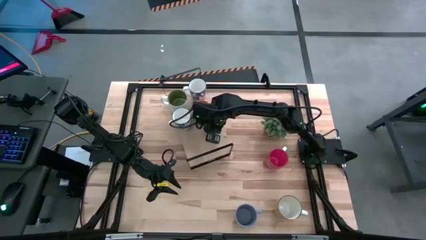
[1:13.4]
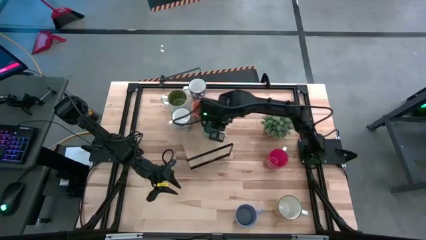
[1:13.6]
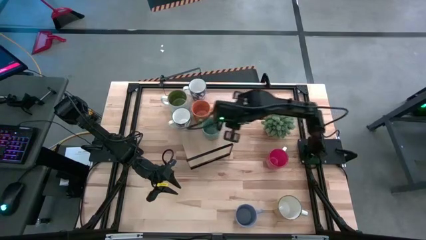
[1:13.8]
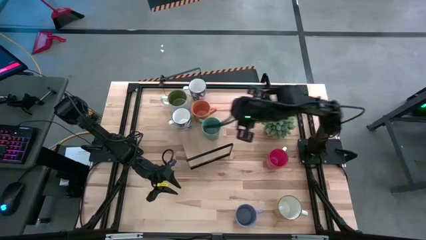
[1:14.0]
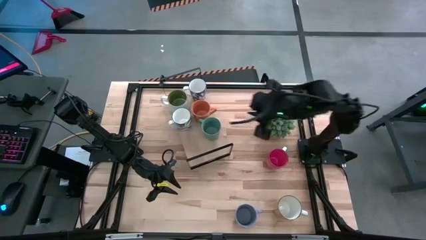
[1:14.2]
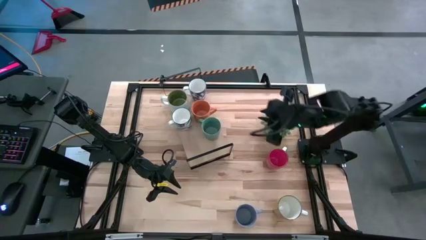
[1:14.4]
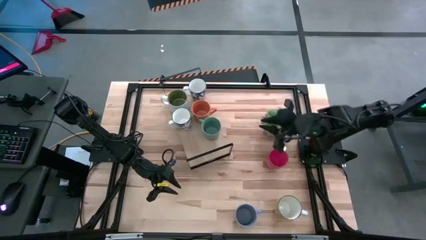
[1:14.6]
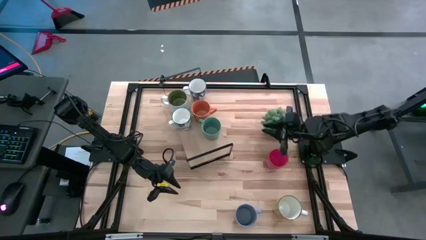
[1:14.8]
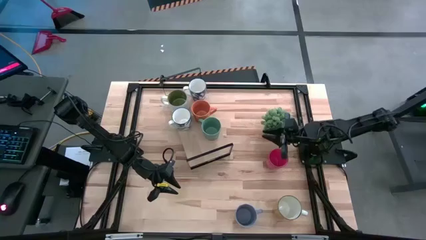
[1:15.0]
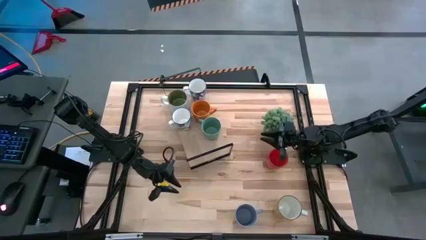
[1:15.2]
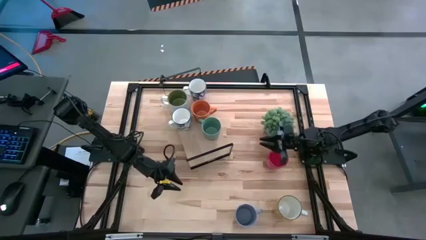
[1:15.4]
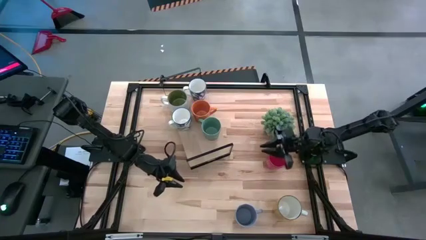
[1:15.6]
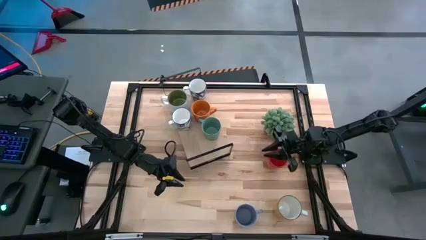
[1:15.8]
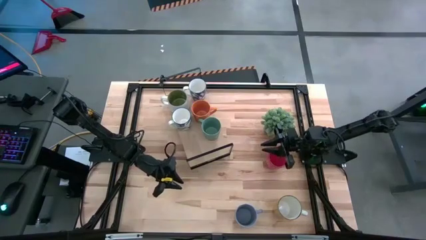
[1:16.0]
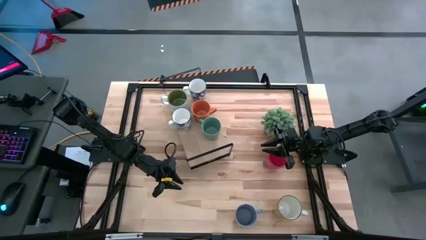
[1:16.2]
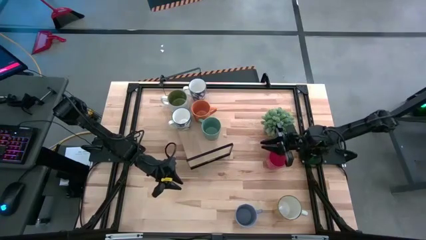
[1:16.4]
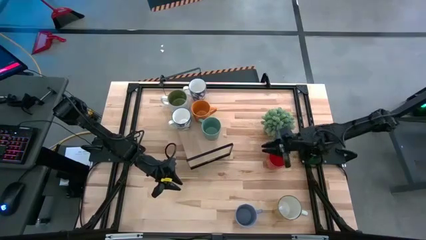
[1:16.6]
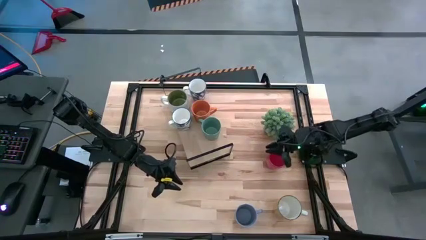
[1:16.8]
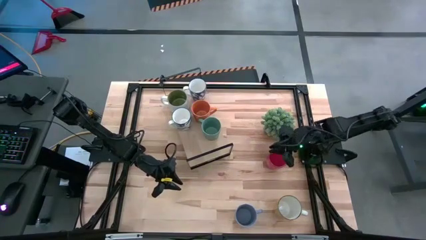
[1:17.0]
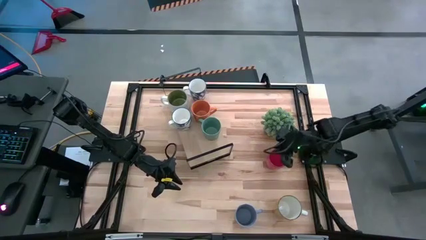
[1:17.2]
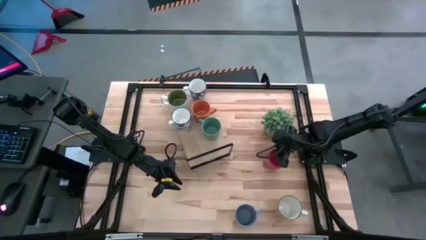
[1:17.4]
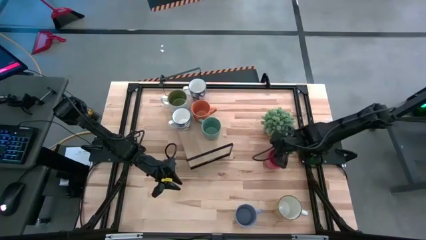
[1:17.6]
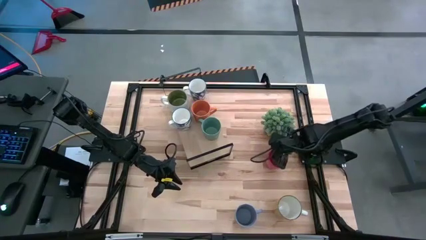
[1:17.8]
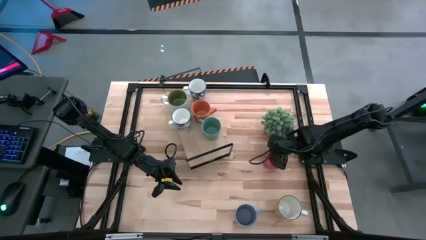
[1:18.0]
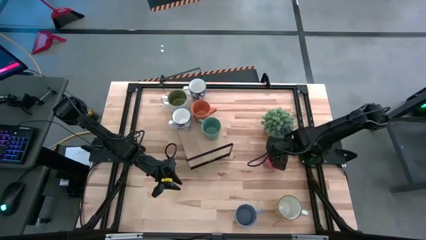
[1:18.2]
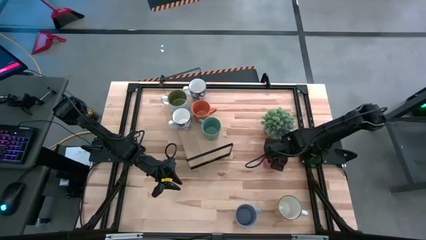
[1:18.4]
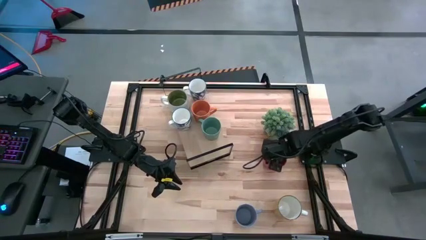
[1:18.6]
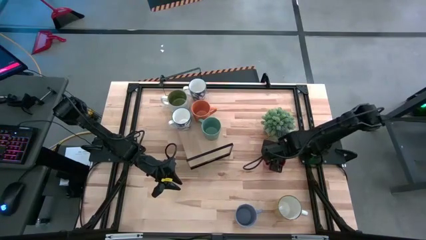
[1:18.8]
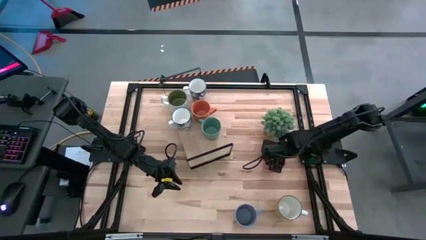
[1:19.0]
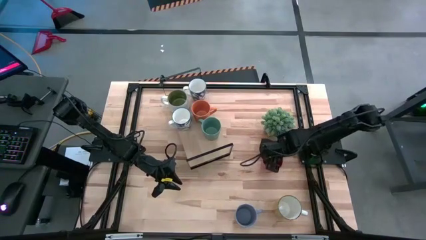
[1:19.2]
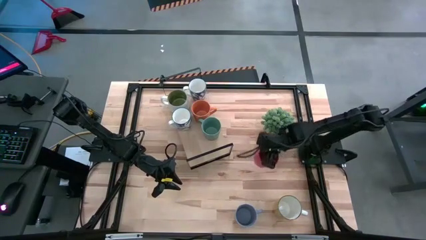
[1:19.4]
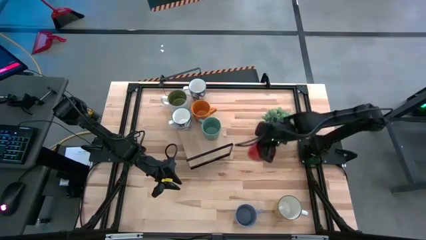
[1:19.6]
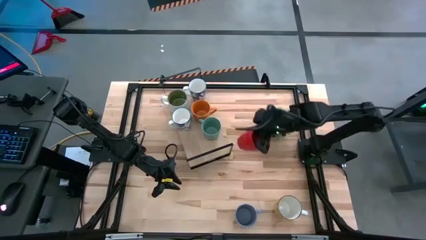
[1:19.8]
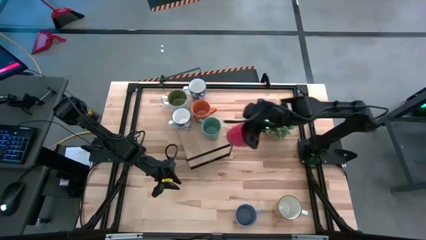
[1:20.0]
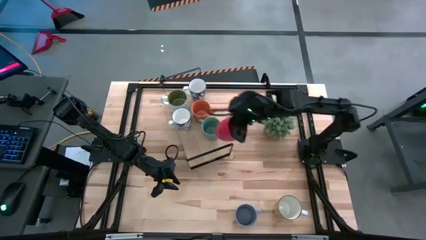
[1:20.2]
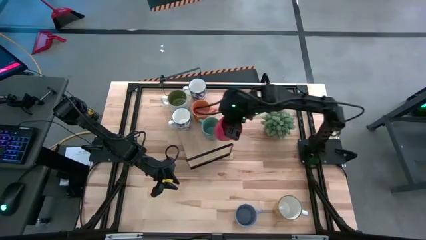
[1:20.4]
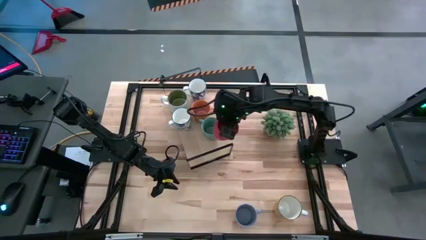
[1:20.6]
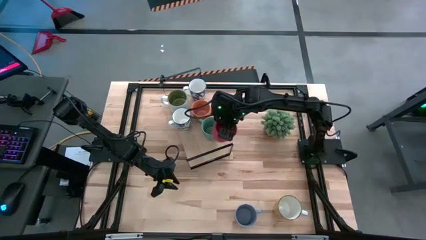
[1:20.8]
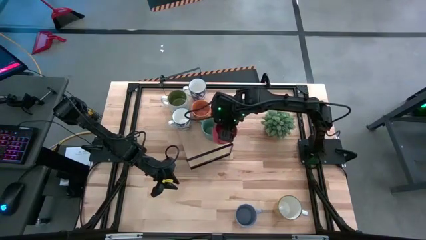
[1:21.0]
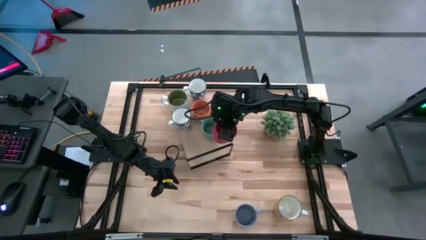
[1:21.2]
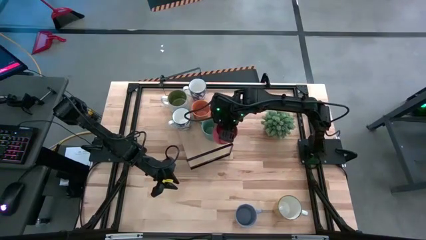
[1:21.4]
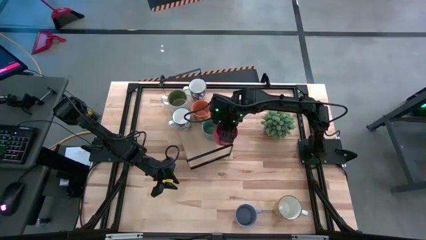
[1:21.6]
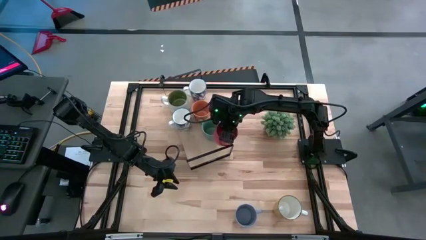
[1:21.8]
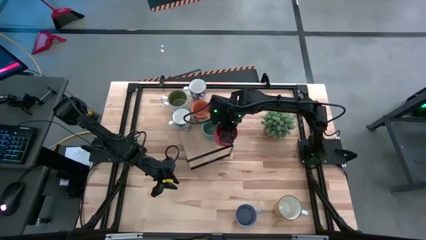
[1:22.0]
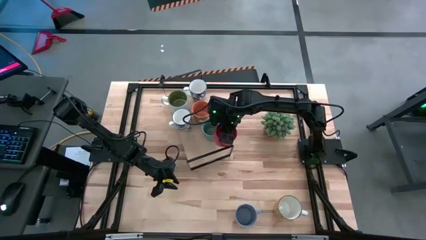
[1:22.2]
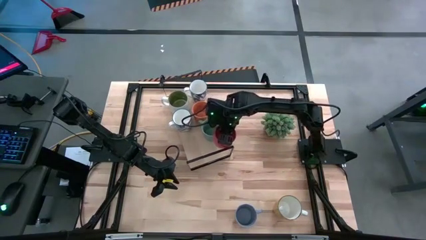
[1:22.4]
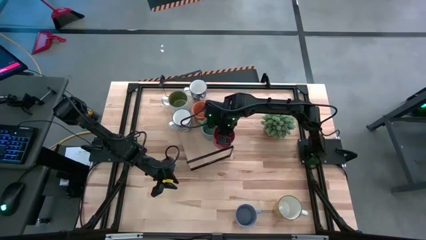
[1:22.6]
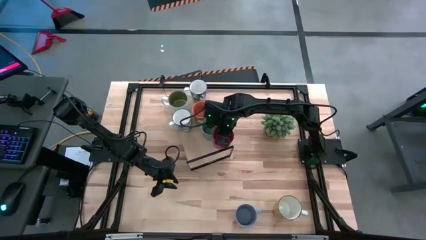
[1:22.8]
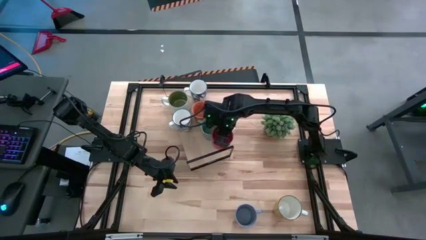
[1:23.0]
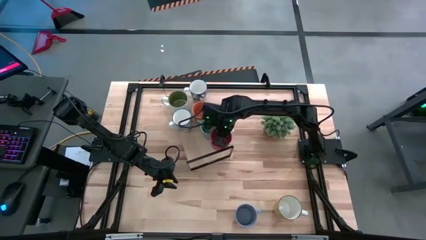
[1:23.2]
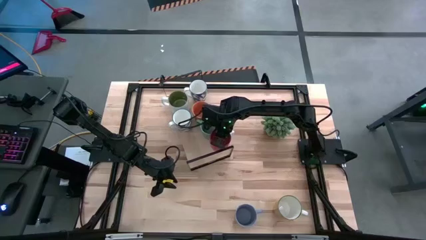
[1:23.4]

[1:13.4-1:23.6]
Task: Place coffee mugs
Put the red mug on the shelf
